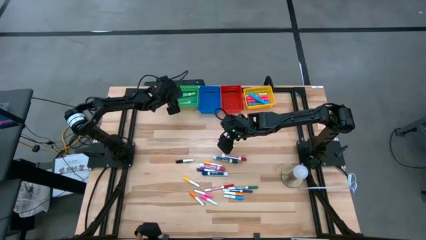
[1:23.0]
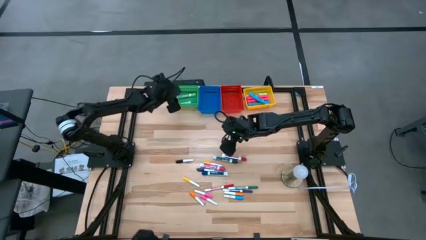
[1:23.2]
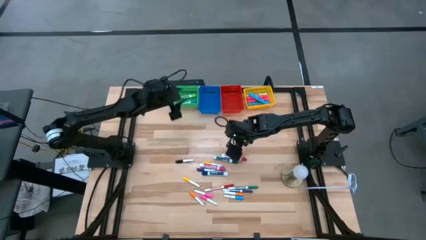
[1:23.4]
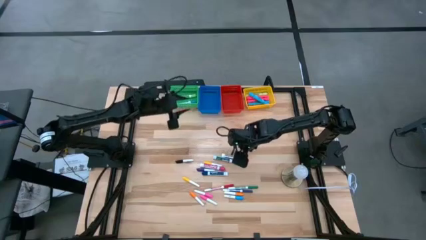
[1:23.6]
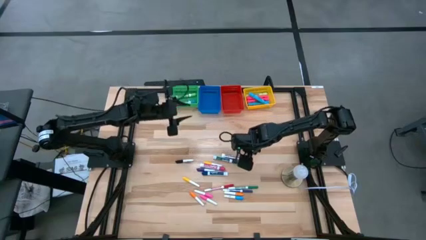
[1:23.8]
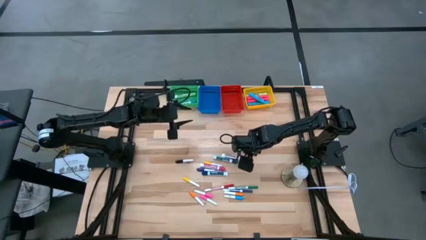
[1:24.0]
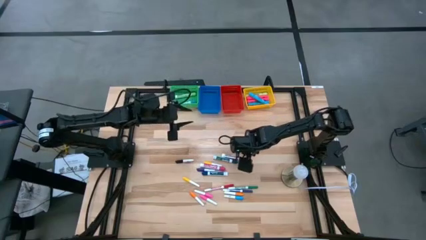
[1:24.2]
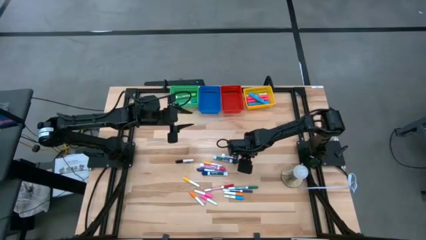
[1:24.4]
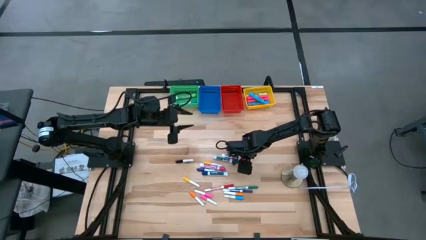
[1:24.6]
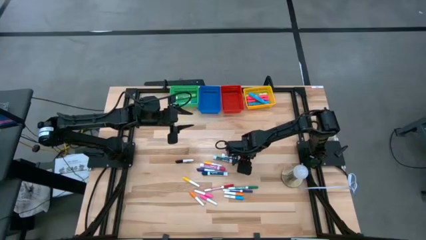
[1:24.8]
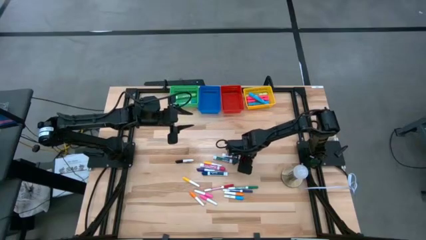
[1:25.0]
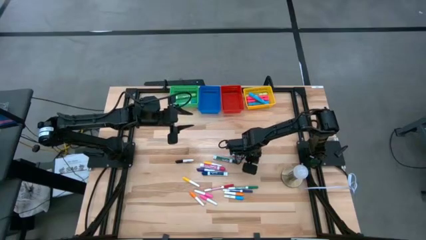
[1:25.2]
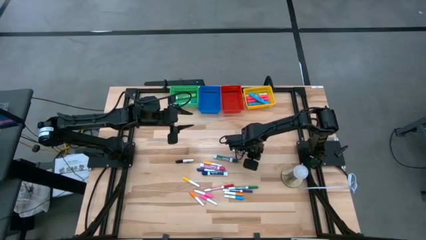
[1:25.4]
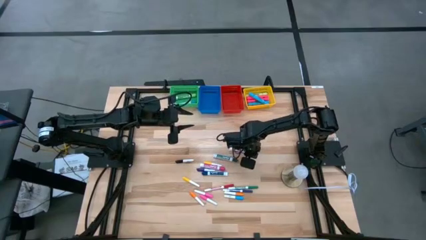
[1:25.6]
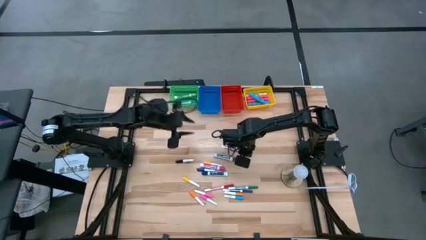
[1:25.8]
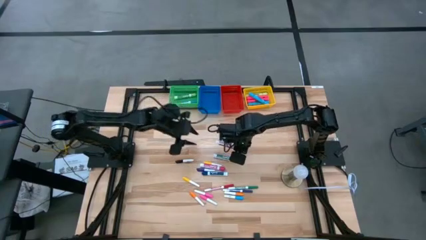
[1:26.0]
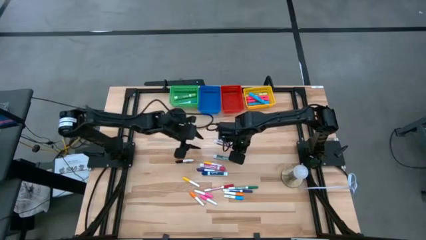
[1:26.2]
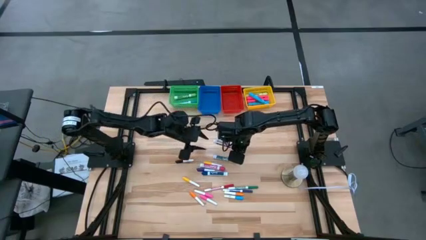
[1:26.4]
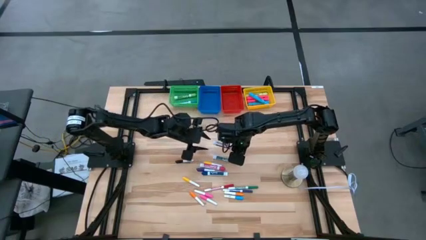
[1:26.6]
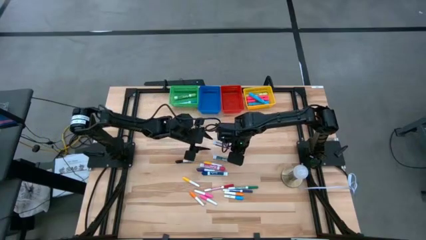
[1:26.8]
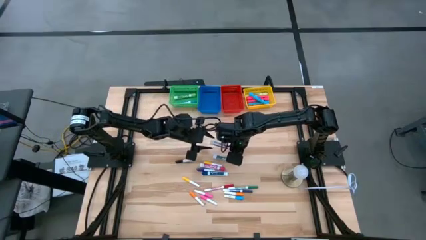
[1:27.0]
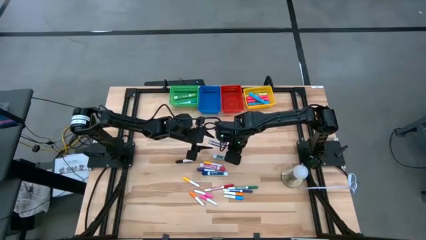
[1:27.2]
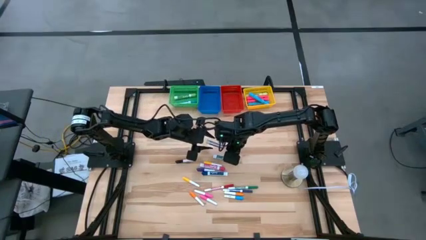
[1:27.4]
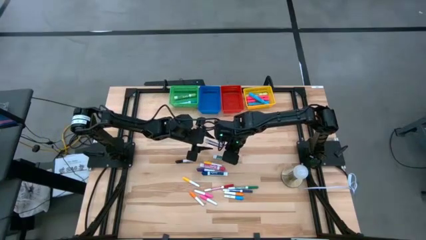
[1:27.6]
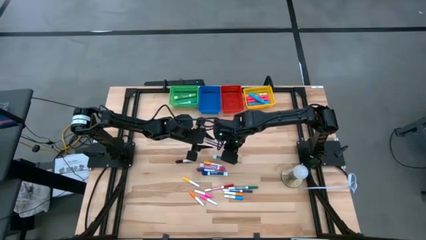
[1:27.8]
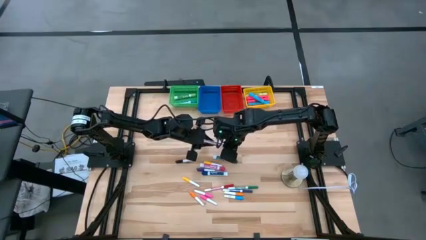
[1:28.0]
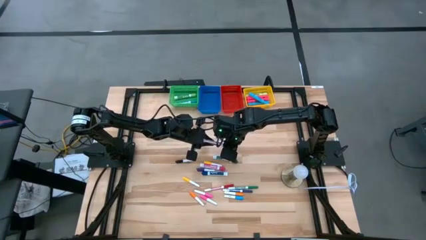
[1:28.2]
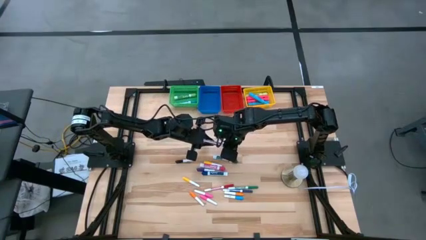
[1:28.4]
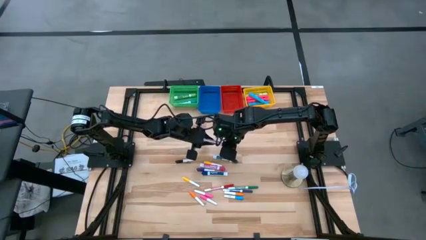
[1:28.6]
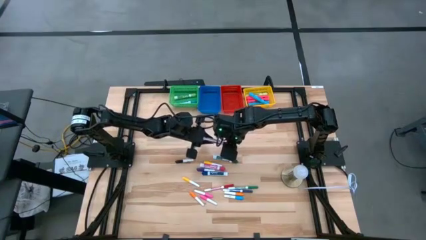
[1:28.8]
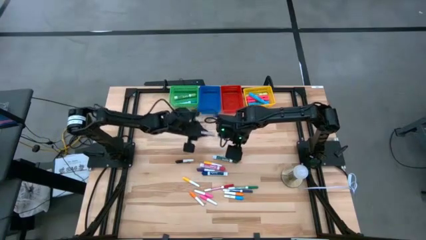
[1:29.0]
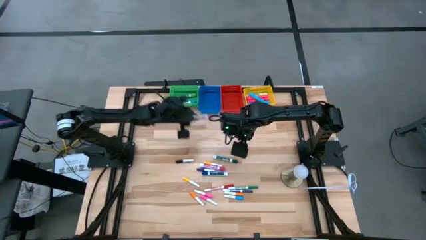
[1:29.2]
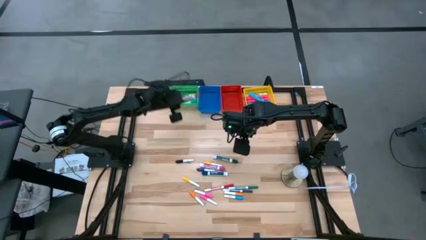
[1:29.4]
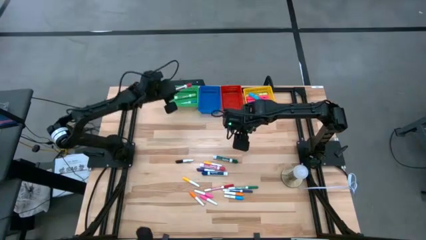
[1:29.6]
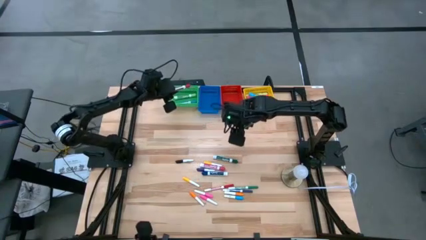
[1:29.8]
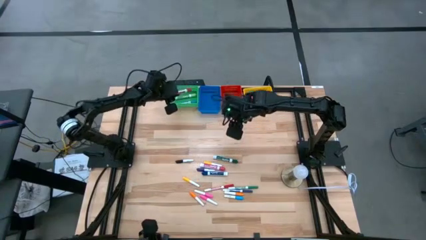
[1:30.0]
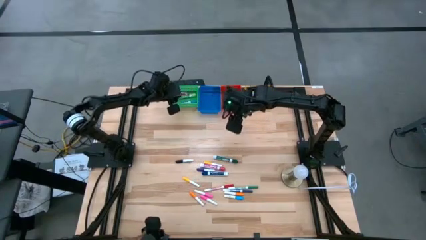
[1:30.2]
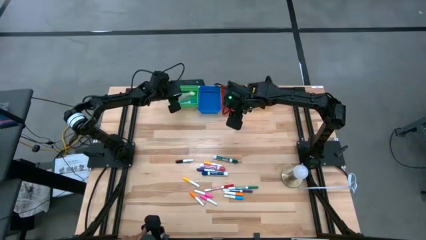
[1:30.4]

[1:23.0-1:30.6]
Task: Pick & Place Markers
Put the large red marker pen into the green bin

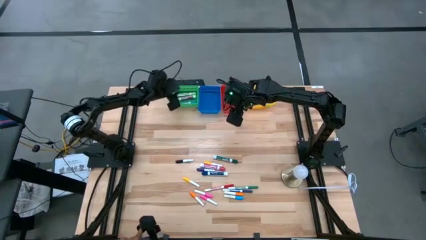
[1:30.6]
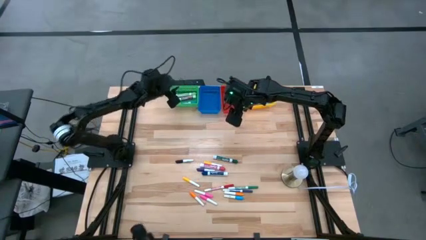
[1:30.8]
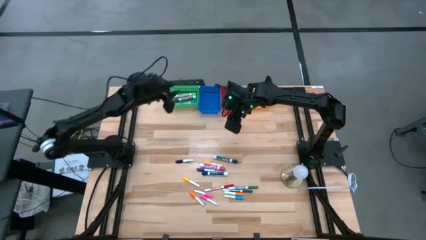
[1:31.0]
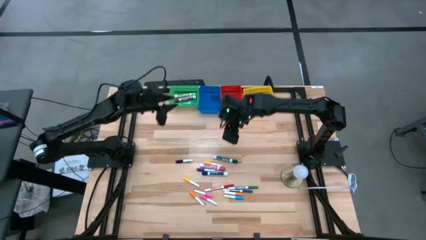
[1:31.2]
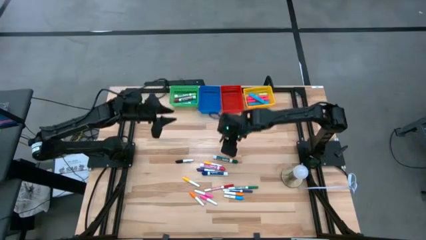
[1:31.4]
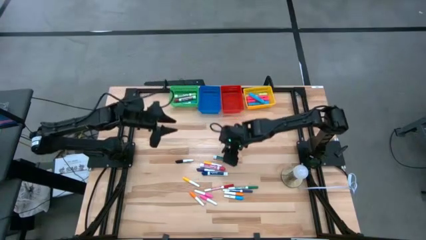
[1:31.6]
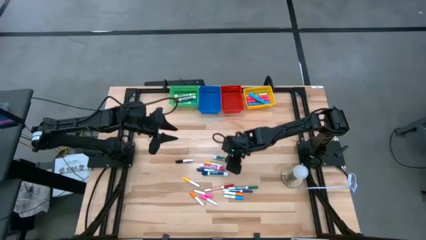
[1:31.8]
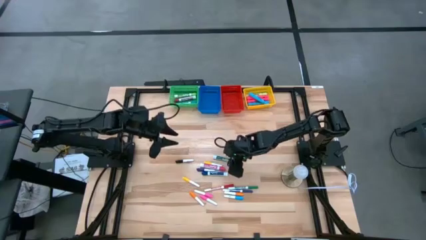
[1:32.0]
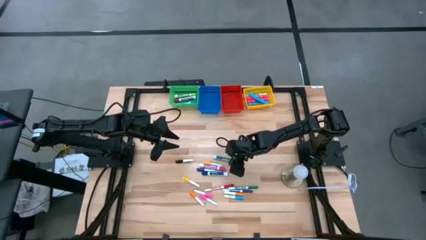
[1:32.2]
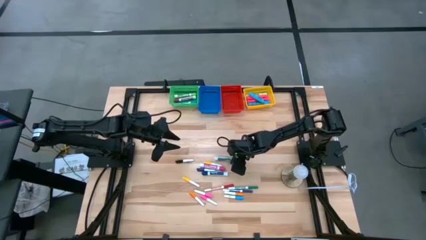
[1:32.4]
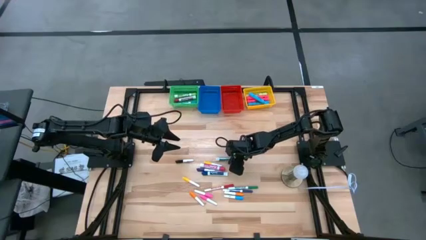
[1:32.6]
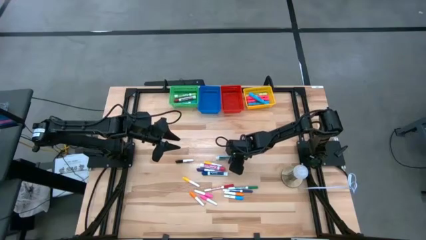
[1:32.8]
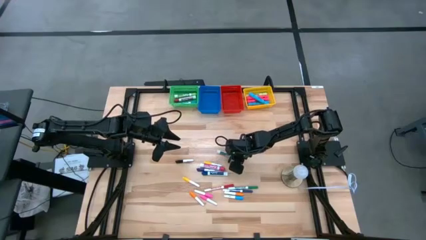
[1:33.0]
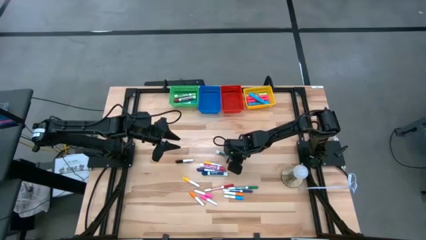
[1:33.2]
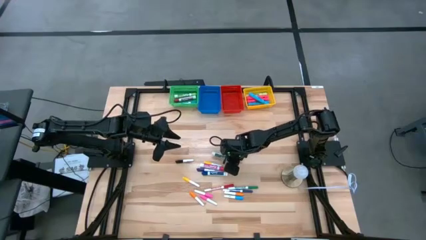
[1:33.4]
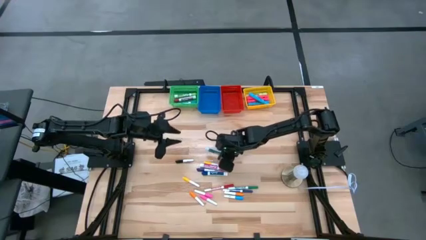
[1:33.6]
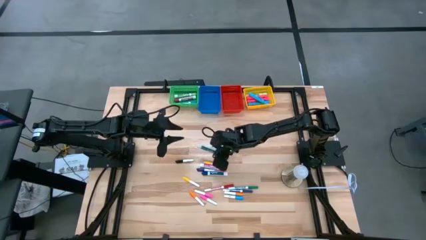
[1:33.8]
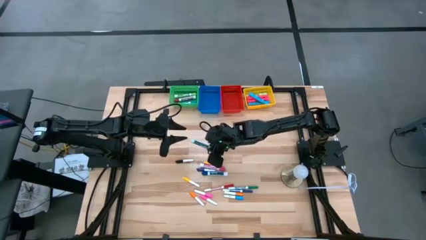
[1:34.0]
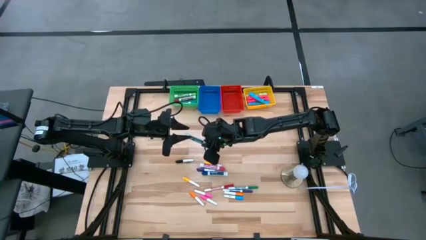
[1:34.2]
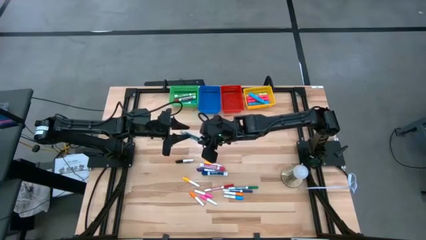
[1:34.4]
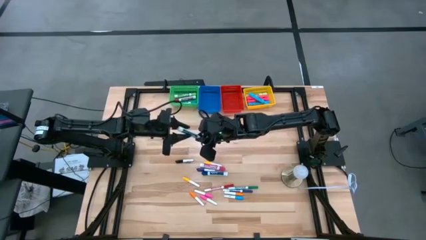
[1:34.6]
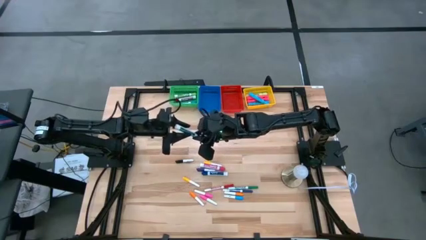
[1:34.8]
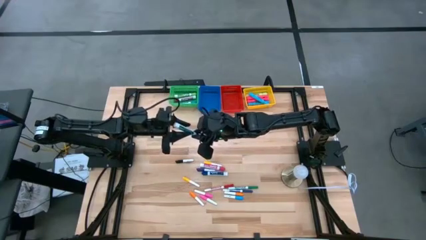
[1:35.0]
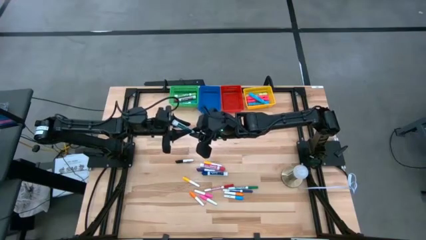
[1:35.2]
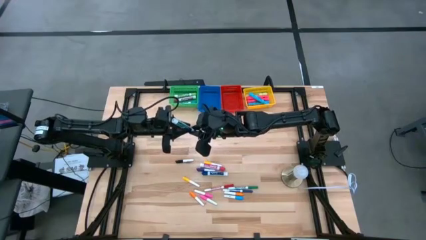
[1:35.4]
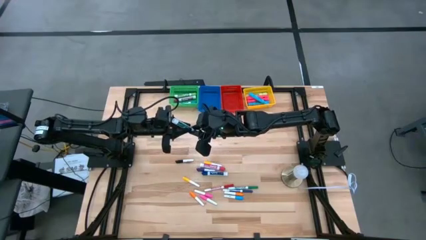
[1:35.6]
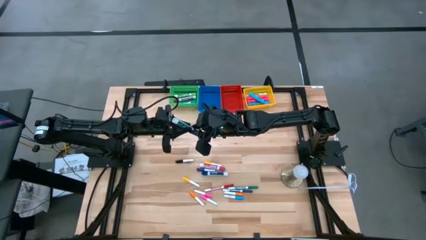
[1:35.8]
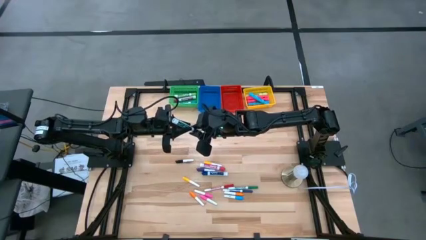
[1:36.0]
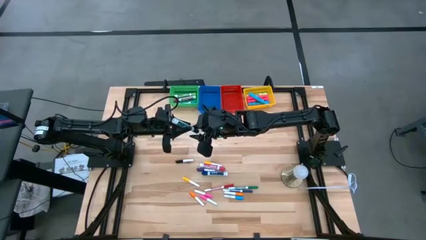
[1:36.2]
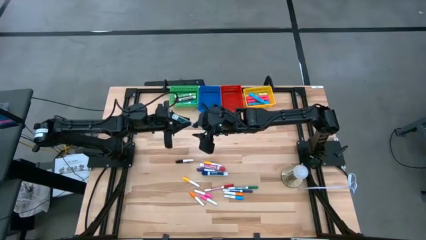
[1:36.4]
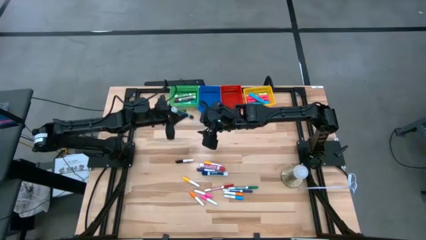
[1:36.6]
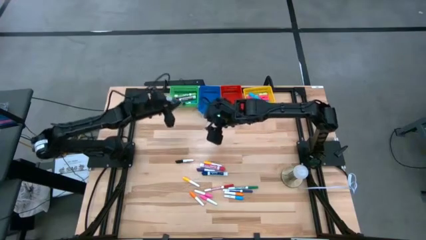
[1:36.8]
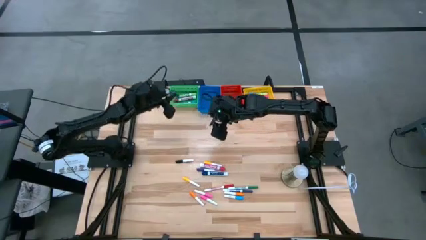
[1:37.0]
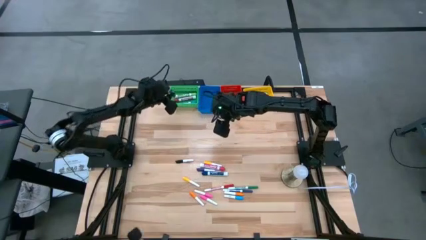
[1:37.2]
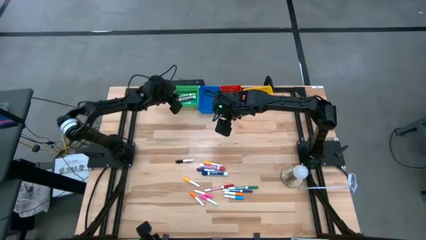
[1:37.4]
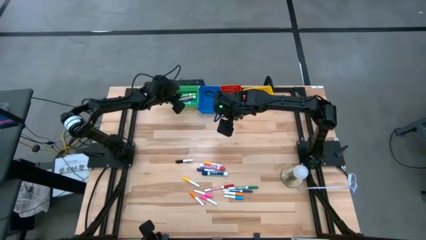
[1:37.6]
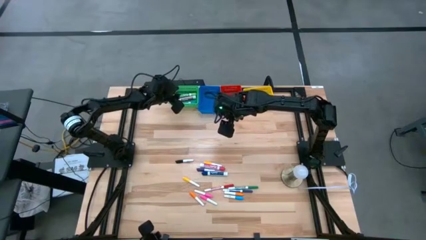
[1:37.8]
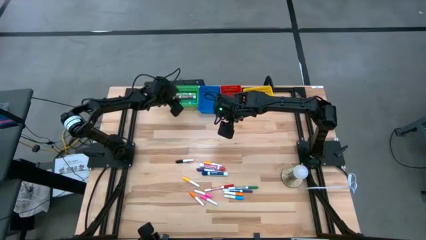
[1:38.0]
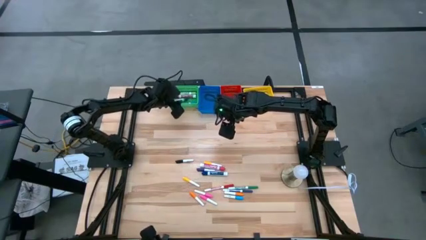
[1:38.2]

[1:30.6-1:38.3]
Put the large dark green marker pen into the green bin
